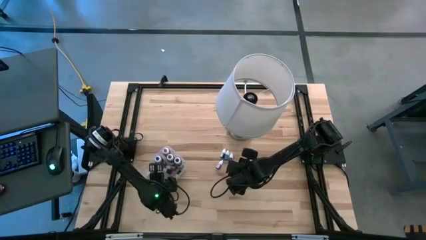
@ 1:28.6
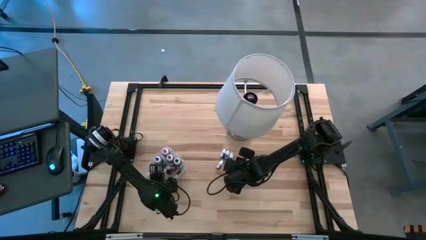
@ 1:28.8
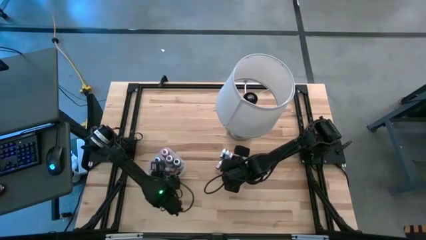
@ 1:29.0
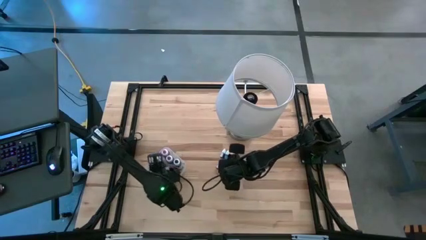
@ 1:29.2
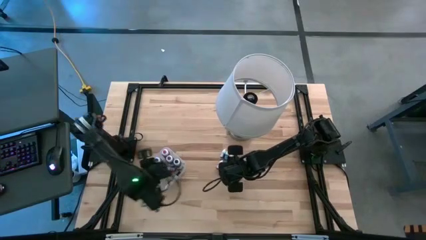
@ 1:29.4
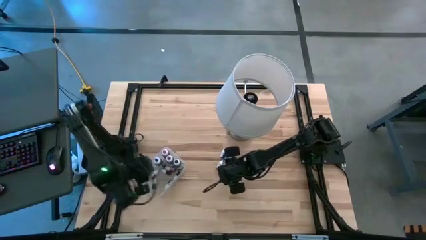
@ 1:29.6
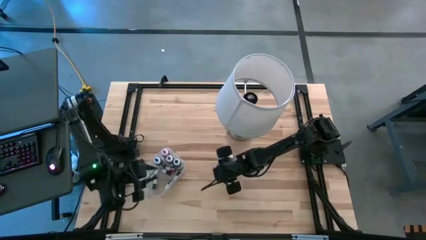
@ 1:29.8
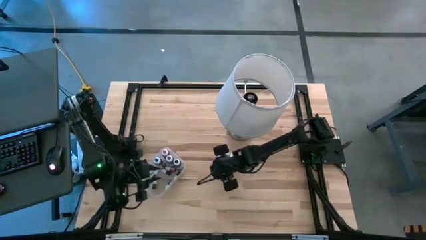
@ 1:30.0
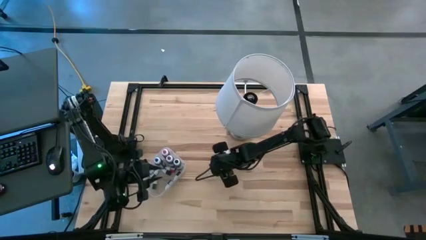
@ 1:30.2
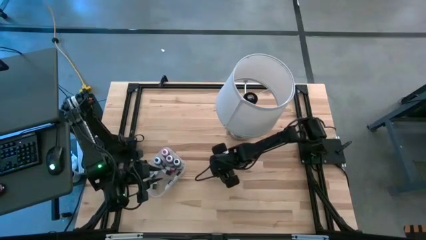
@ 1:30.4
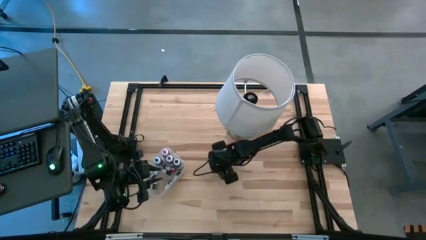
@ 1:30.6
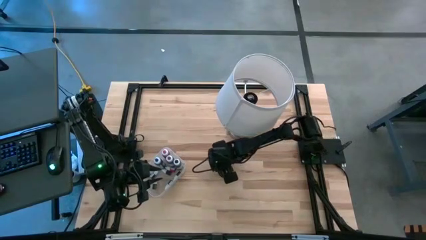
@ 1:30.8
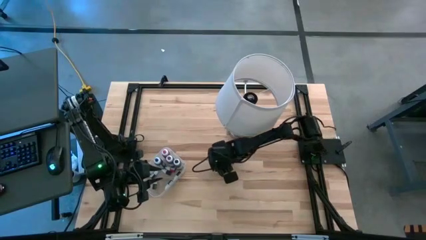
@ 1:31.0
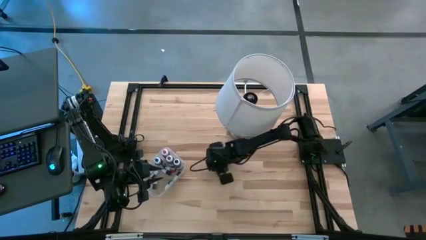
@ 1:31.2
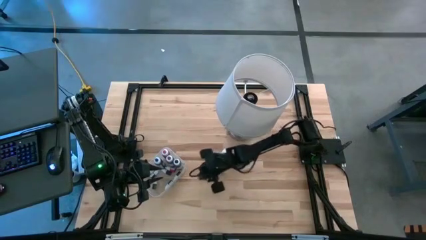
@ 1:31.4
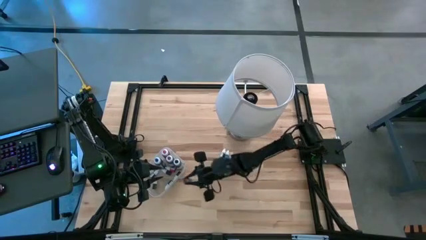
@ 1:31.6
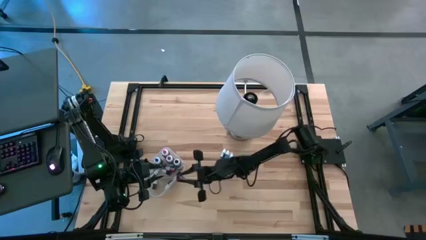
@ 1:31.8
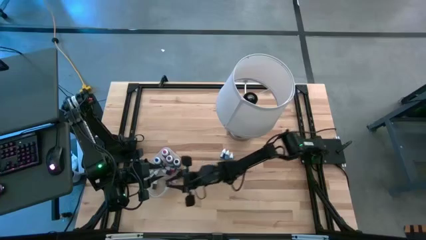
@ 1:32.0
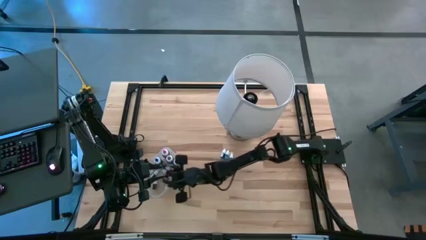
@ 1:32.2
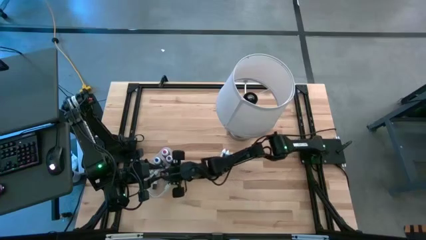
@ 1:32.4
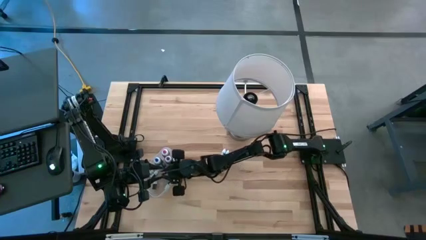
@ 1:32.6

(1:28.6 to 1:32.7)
Task: Pick & Place food coloring
Put the red food coloring bottle into the transparent bin

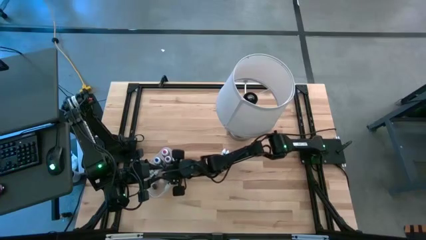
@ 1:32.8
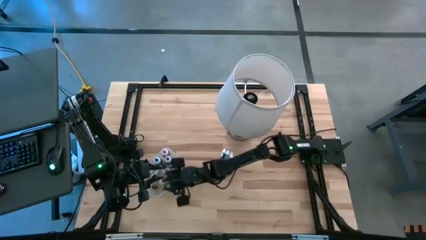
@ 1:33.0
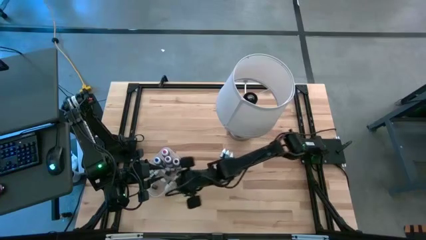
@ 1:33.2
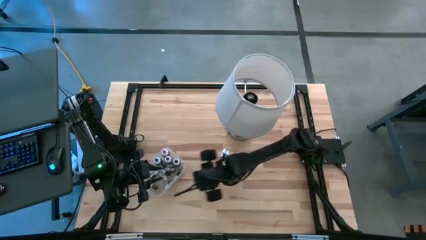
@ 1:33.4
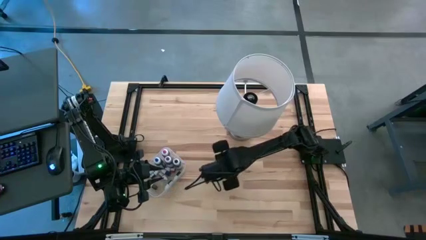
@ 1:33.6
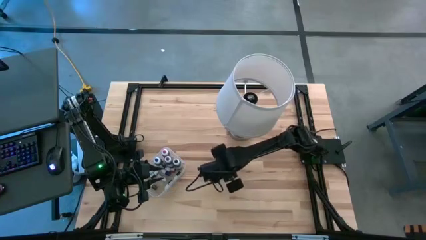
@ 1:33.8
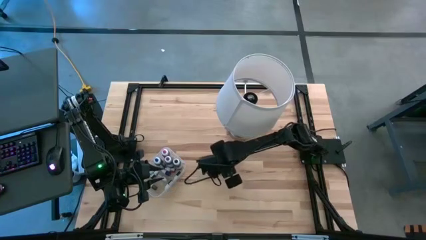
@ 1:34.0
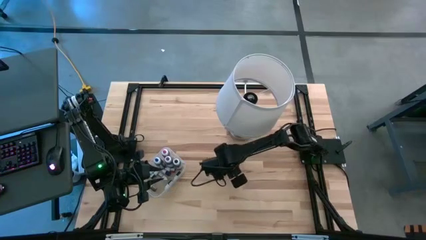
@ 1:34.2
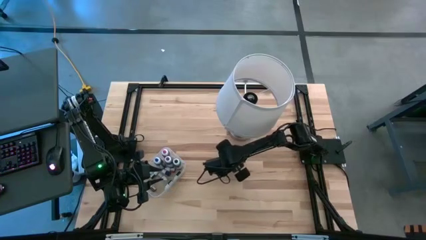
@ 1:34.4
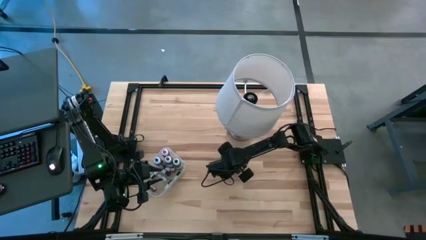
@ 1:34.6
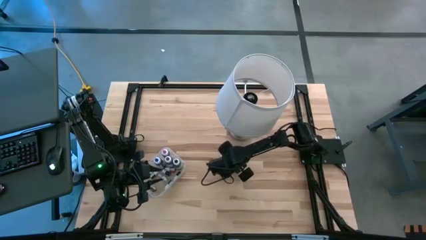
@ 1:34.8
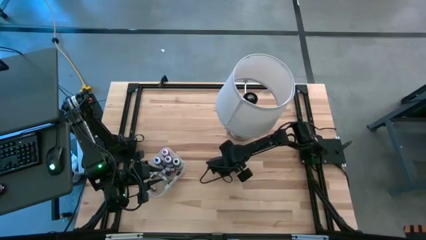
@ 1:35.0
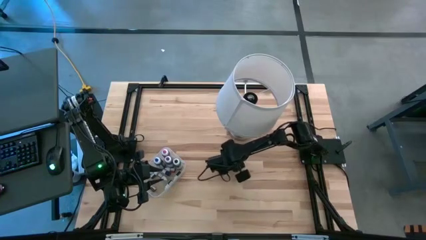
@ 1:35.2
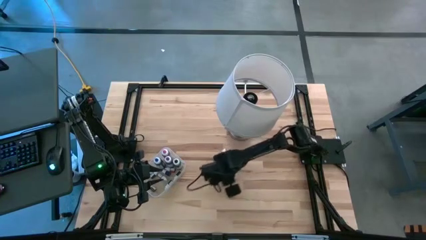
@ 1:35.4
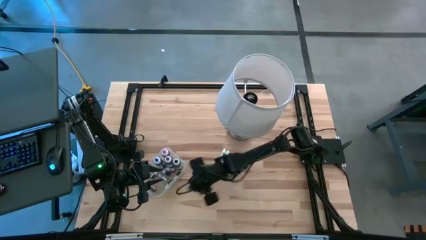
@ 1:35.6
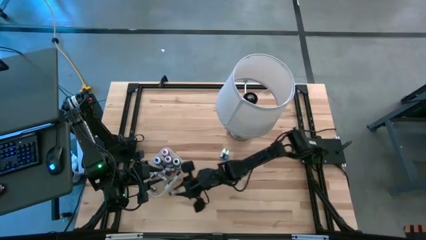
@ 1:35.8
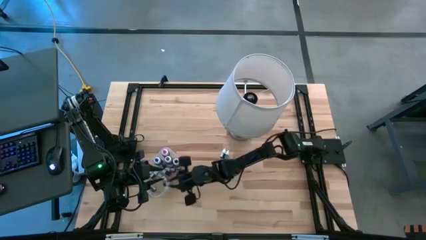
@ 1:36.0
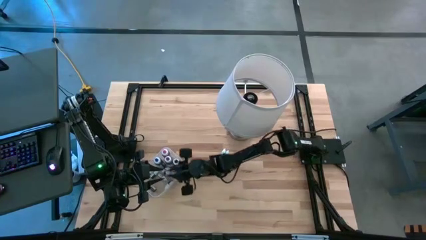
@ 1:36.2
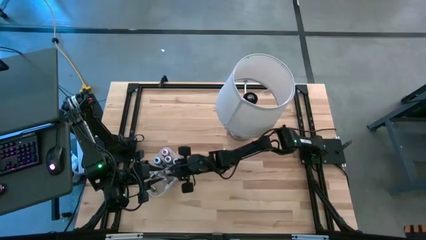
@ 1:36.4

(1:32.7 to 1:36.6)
Put the violet food coloring bottle into the transparent bin

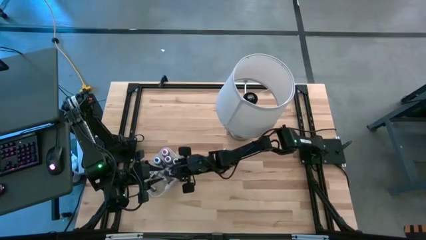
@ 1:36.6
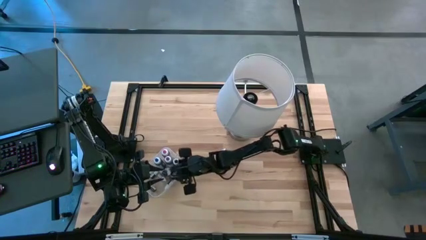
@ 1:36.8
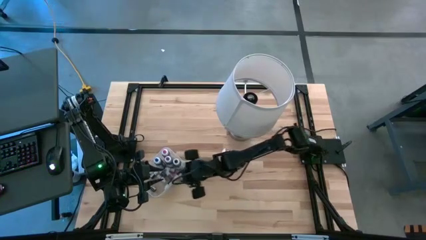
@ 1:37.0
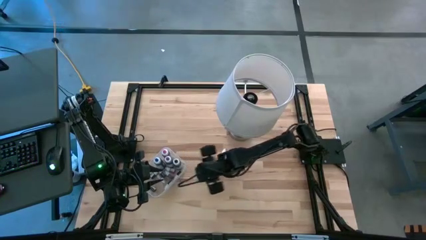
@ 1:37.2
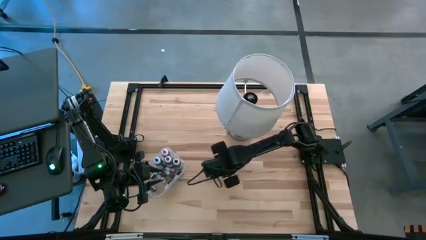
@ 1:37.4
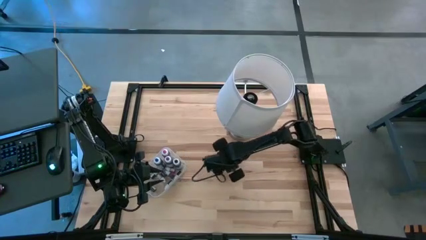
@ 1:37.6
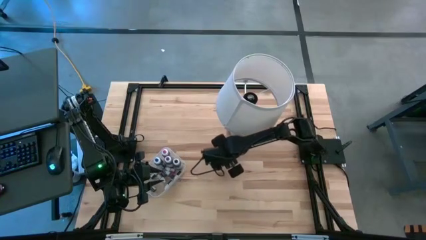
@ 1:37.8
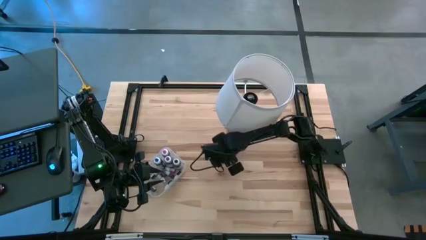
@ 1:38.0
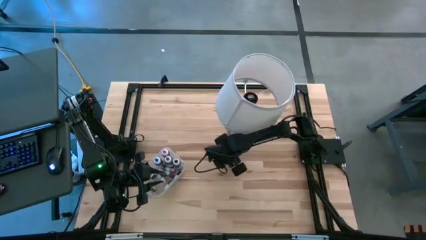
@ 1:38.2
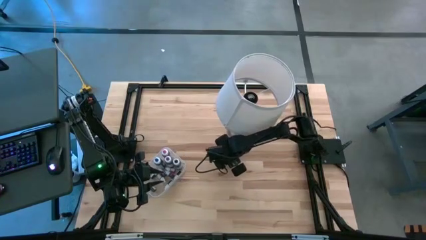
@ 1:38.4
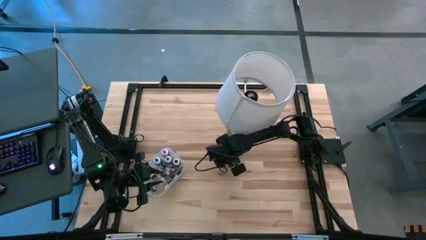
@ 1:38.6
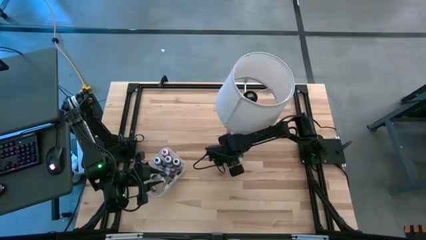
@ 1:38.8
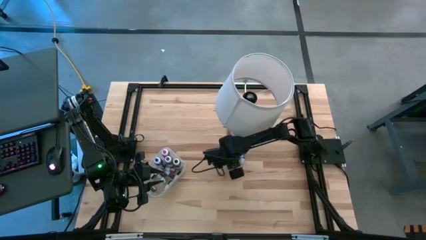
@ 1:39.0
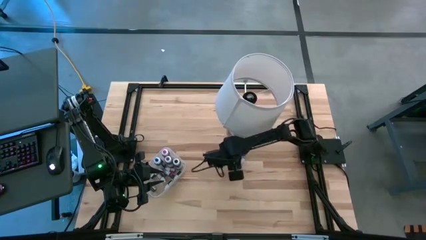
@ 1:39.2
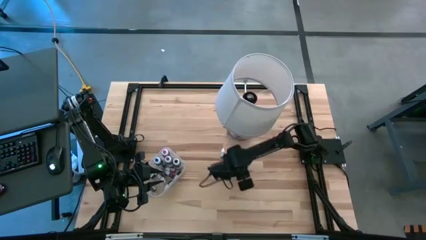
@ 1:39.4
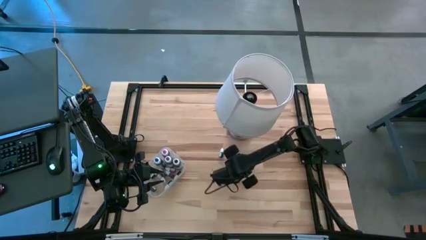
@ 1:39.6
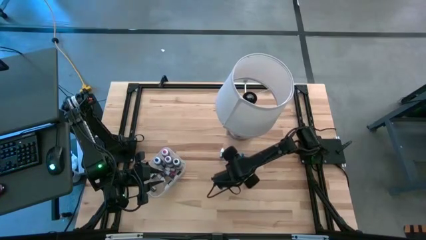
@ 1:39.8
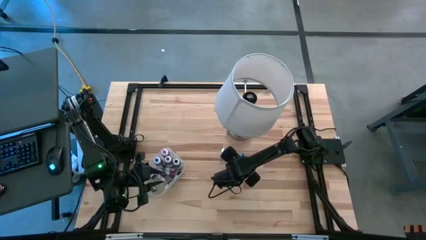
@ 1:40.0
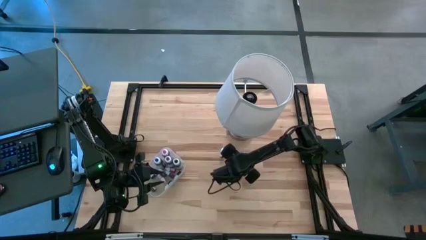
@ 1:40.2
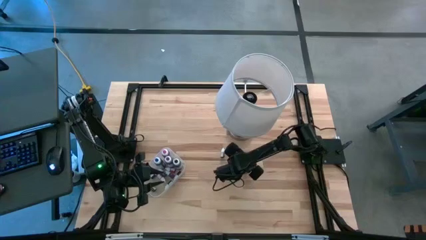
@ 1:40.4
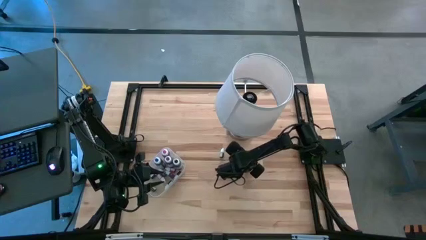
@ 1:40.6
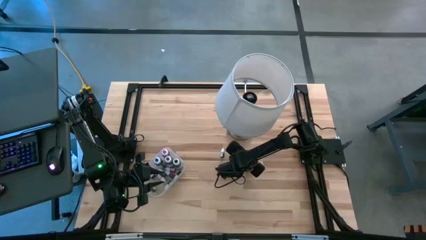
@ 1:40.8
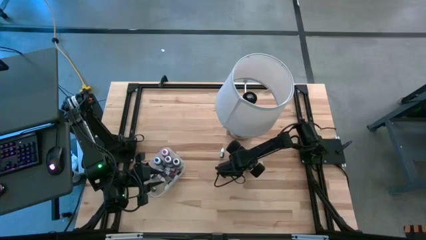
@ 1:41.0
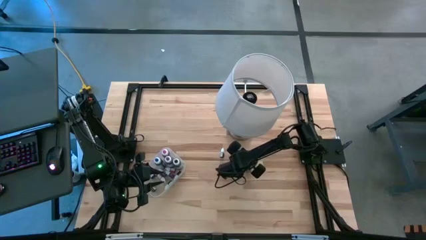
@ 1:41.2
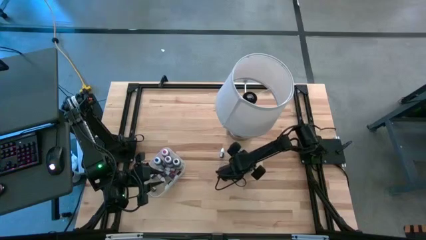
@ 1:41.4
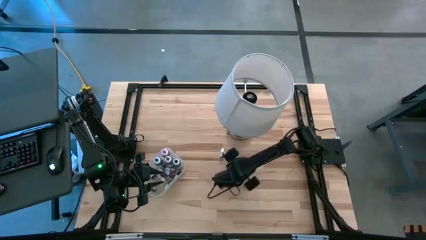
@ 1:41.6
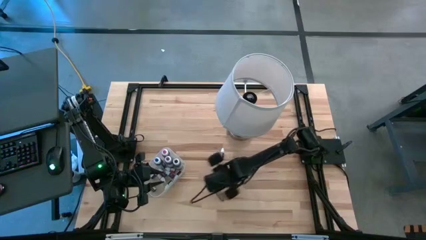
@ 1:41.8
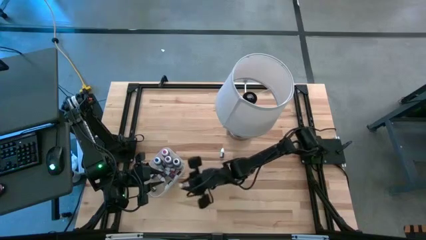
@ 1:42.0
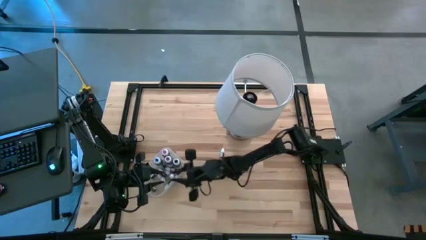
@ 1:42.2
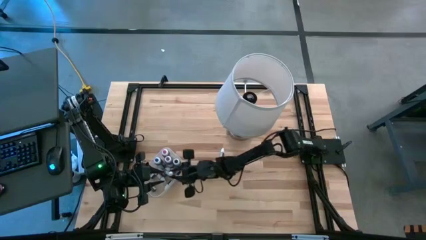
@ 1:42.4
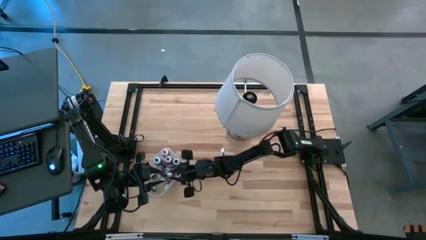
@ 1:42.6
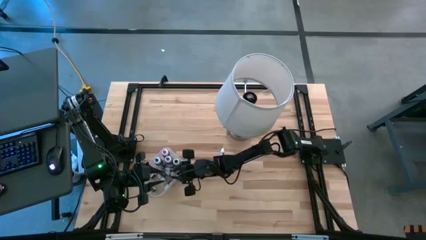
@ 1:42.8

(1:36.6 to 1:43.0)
Put the blue food coloring bottle into the transparent bin

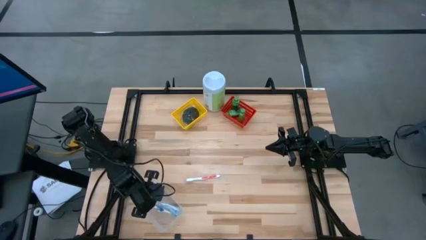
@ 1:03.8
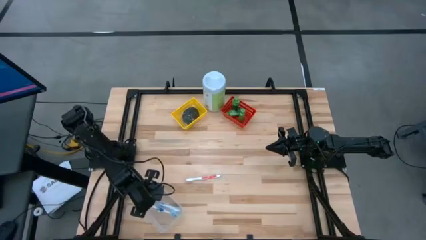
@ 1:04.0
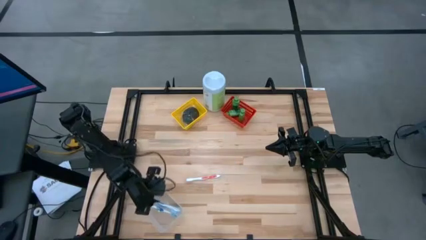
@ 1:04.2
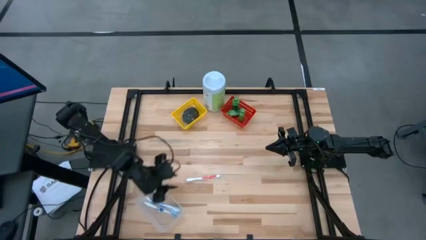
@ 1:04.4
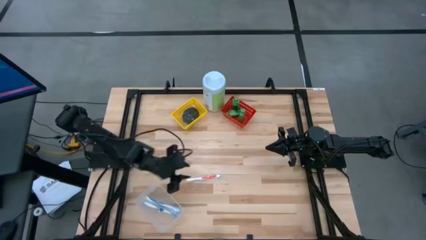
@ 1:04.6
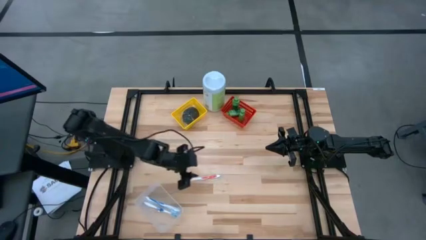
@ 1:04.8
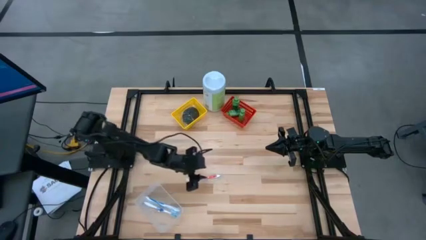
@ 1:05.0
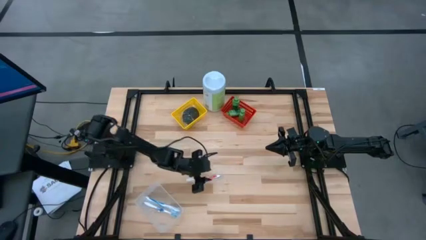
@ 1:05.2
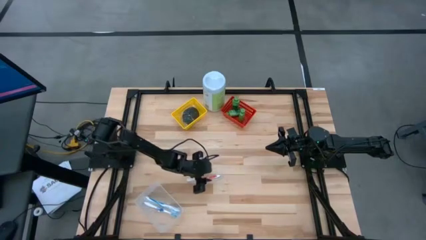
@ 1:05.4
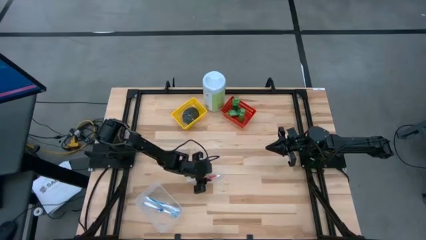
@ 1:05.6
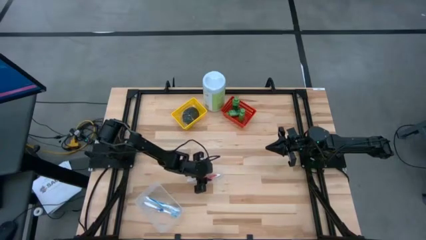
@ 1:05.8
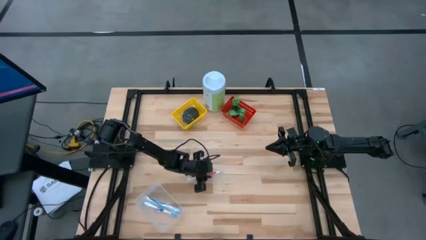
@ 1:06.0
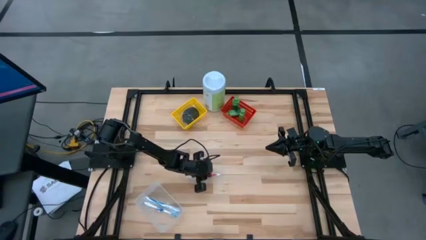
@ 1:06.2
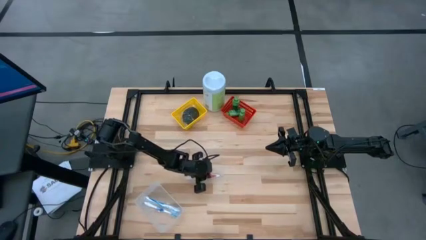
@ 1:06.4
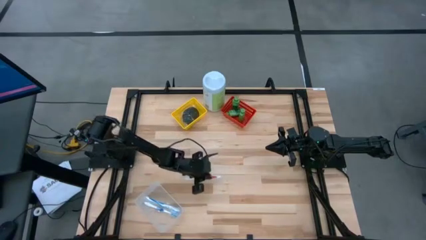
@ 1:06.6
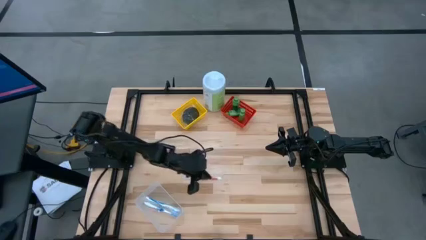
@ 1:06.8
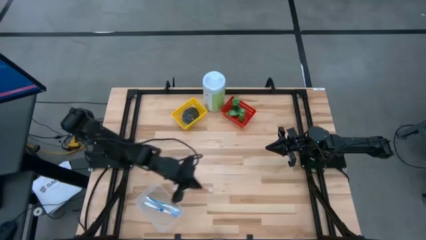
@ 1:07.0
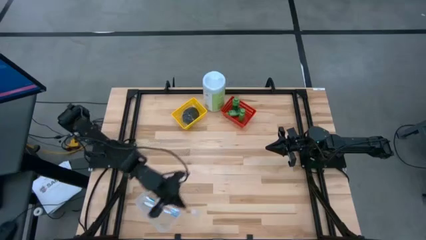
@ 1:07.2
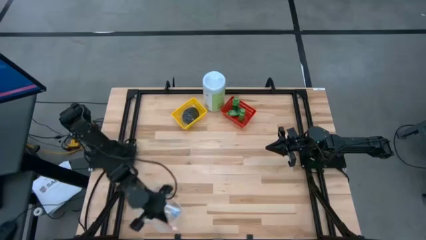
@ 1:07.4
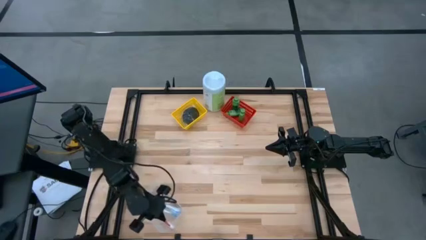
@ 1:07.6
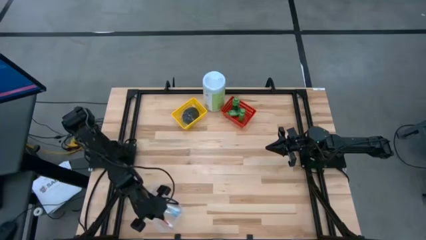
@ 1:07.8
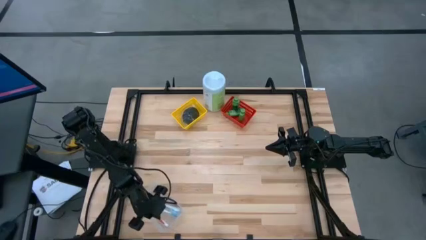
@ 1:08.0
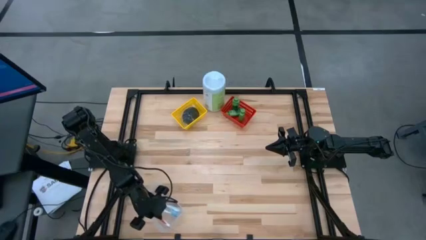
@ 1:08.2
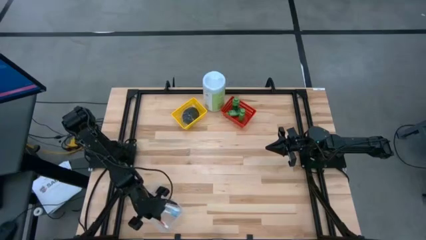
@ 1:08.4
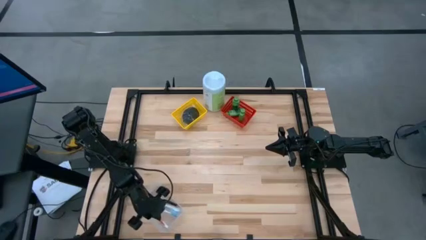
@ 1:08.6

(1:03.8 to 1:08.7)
Task: Pick & Place Travel size toiletries
Put the orange toothbrush into the transparent bin
